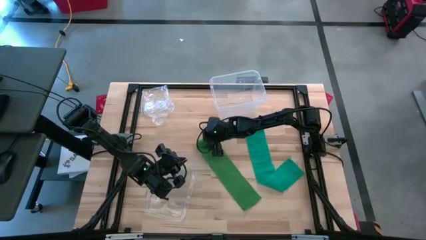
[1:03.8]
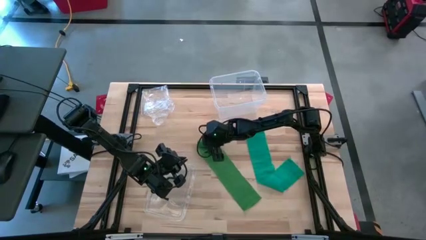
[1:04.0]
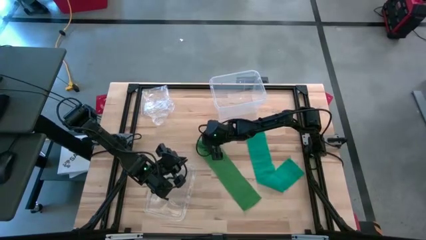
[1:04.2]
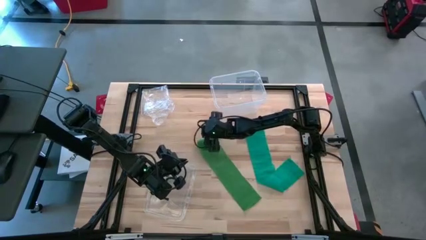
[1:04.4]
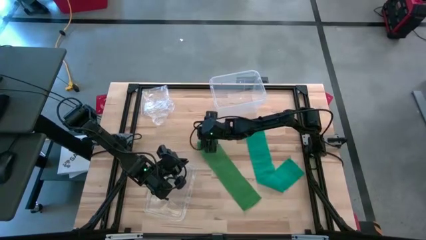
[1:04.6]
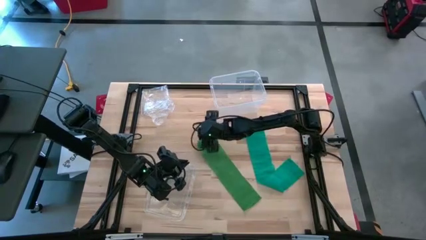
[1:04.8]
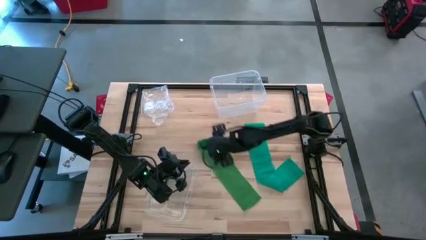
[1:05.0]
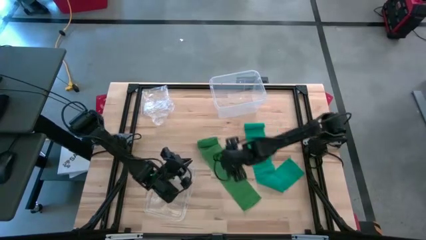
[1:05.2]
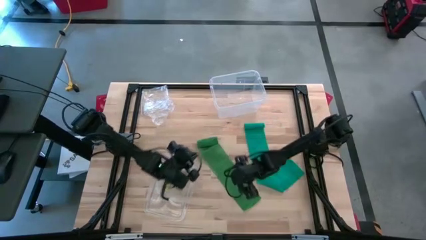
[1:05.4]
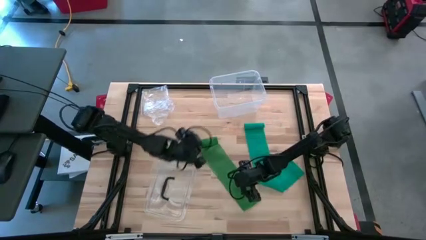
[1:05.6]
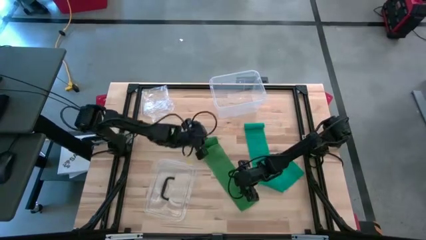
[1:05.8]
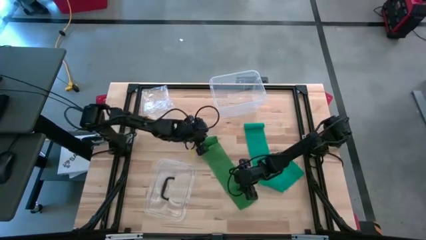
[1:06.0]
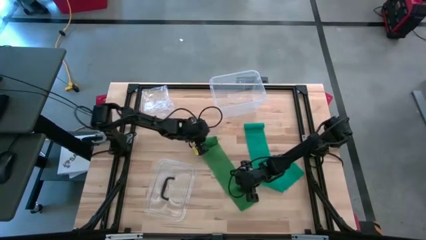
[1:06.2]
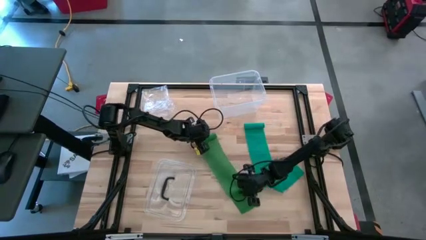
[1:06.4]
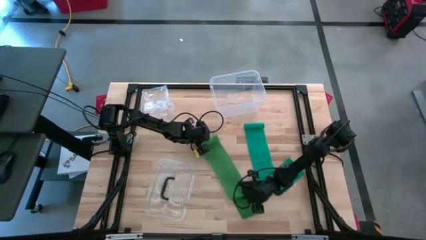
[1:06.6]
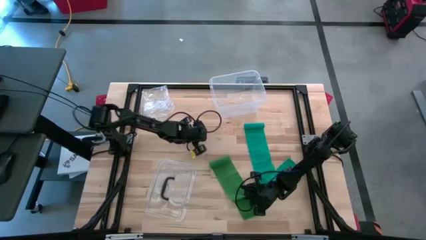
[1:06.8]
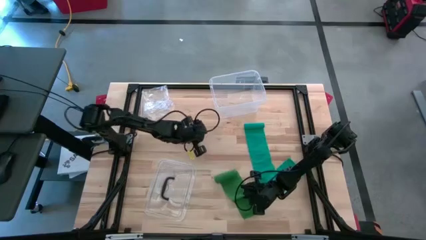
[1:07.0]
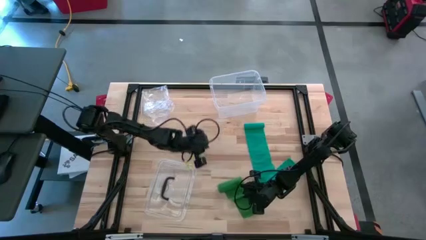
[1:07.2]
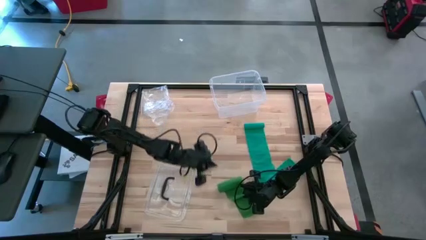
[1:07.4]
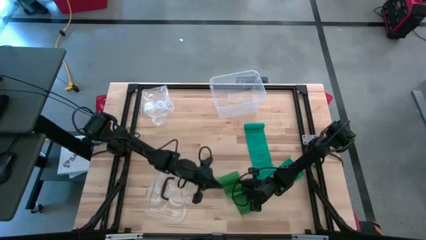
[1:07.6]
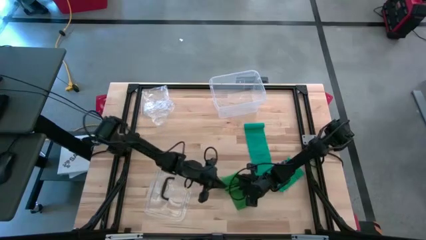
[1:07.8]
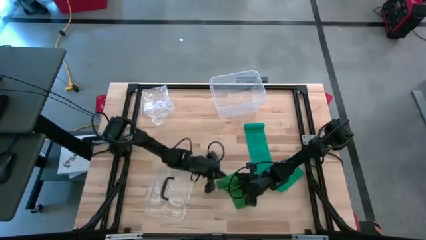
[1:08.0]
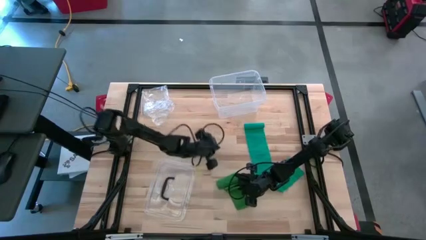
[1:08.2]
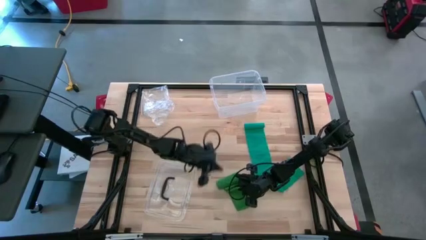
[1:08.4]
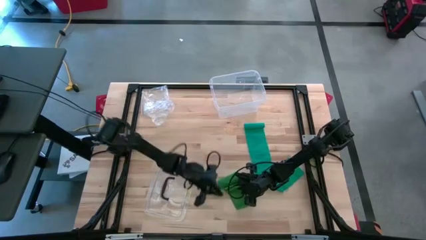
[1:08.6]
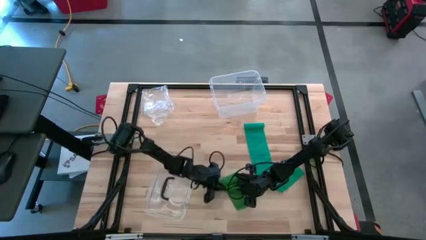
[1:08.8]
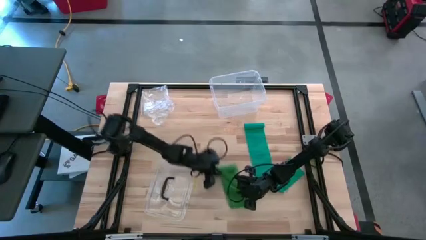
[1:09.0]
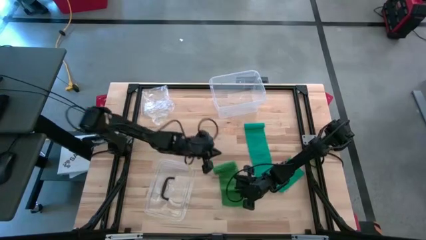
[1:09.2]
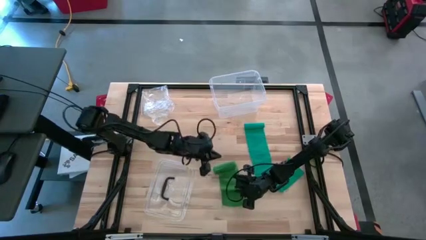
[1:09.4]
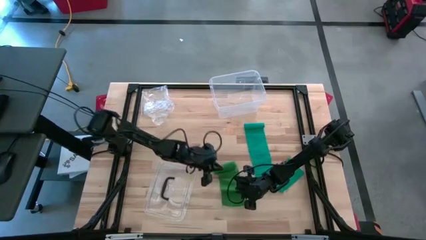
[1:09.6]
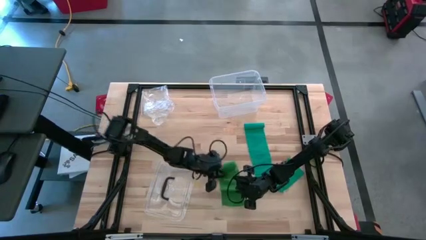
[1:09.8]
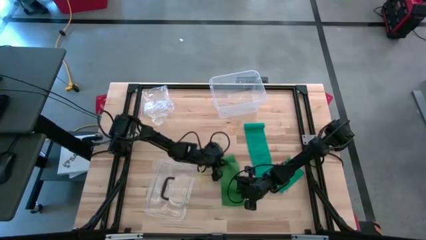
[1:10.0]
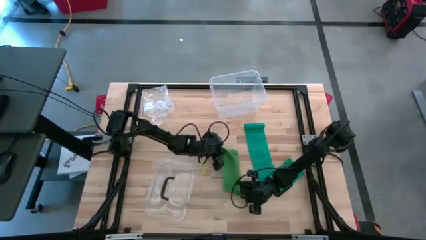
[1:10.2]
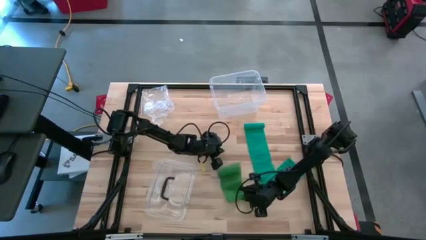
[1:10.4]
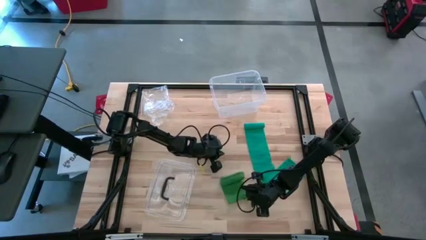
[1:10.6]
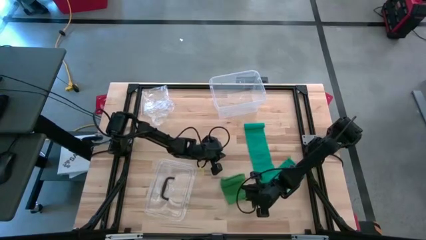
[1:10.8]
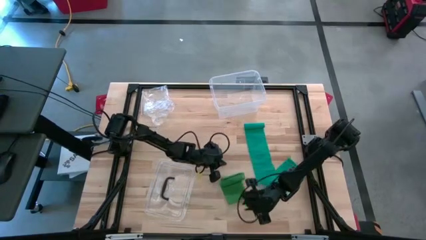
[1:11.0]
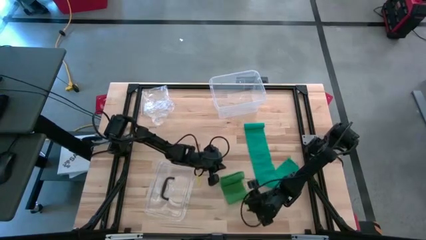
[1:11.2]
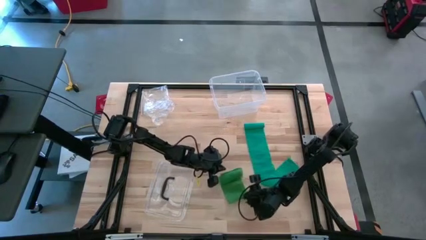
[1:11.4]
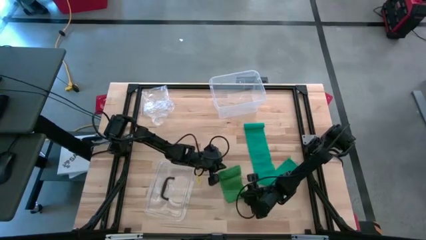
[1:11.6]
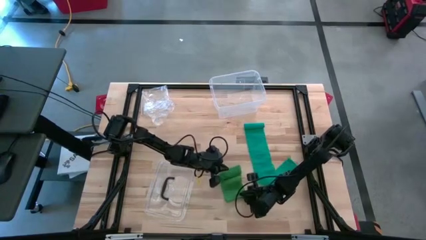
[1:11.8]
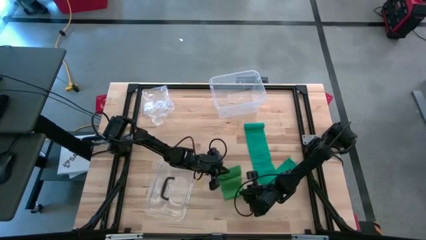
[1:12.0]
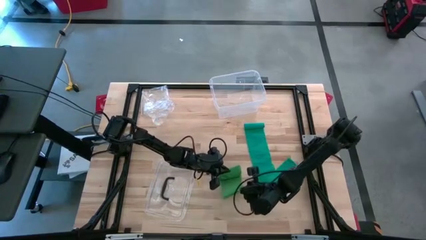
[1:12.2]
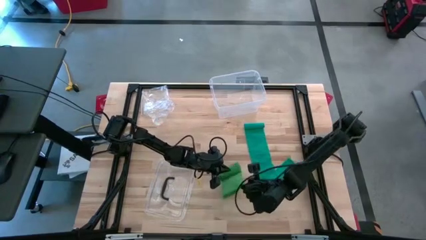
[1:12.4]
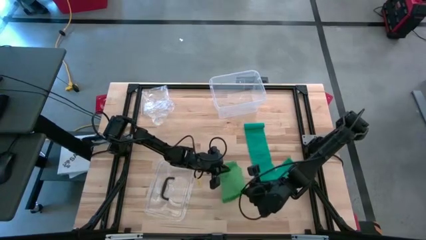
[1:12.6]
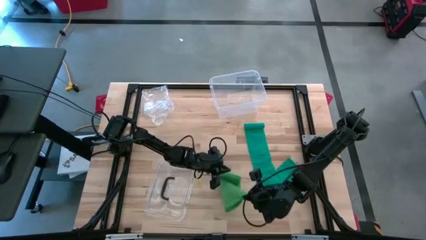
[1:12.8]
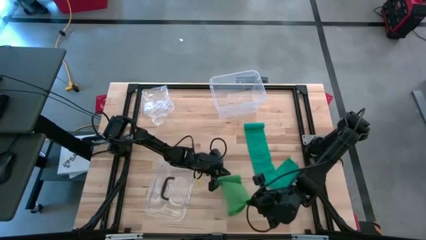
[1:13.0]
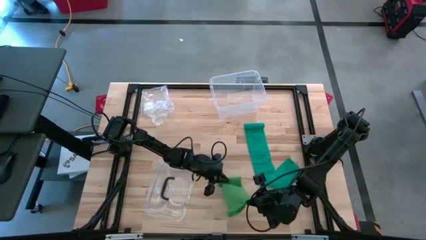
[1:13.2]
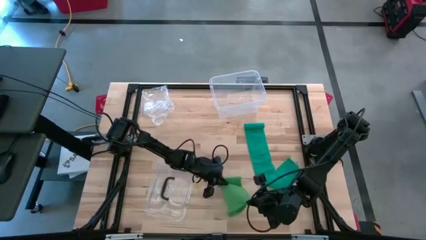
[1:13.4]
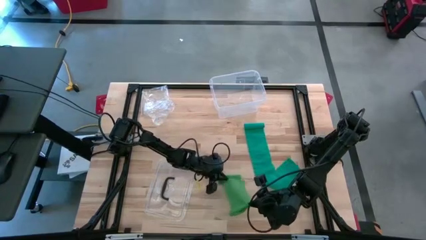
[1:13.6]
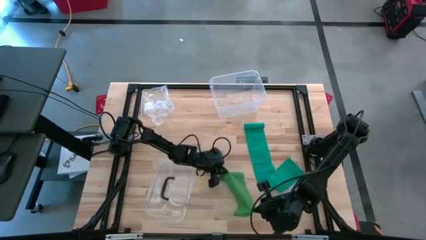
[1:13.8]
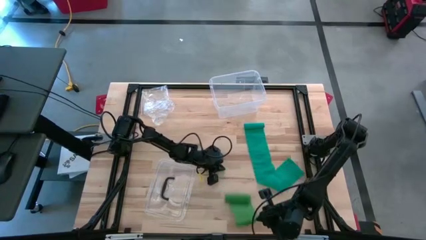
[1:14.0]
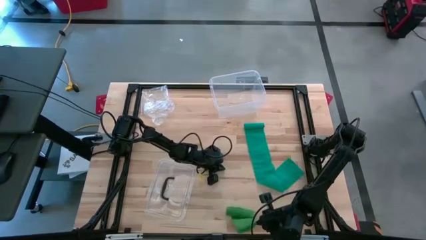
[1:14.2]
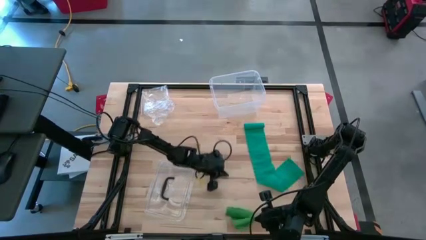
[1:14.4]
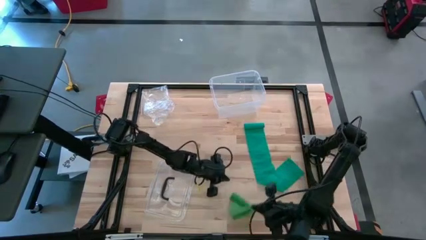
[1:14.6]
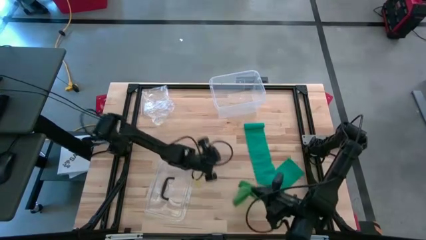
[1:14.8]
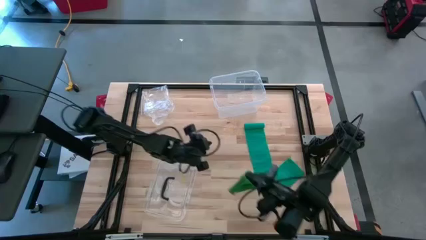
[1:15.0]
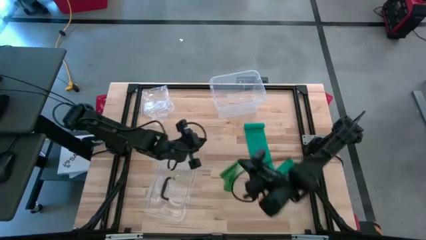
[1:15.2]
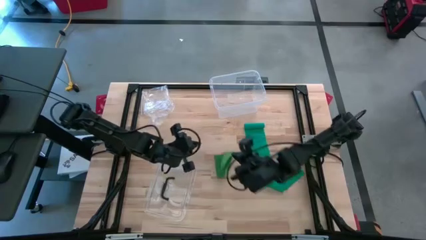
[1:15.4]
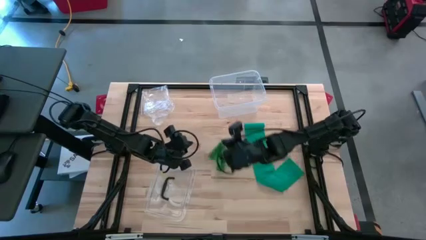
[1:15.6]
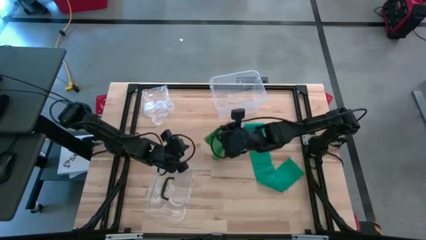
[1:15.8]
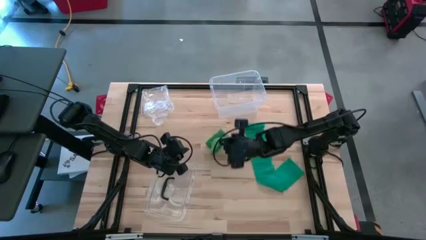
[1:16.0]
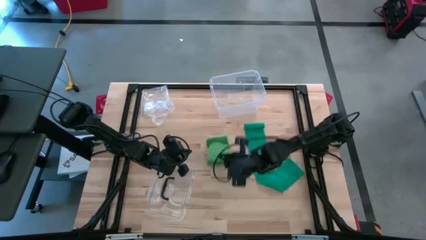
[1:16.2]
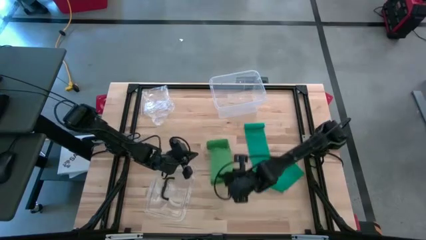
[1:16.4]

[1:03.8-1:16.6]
Task: Roll bandage
Roll the green bandage

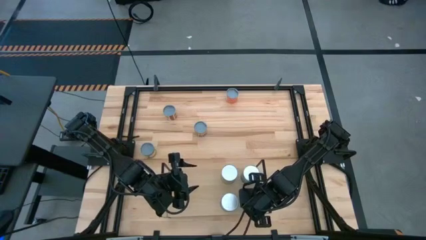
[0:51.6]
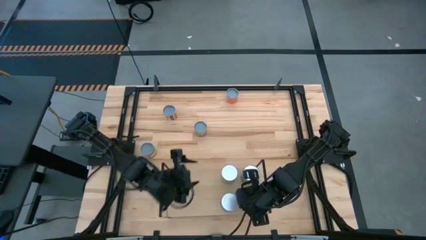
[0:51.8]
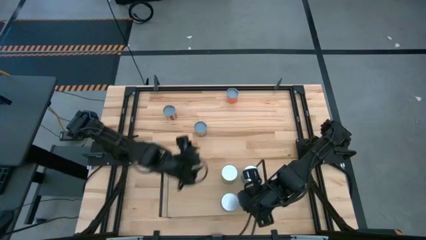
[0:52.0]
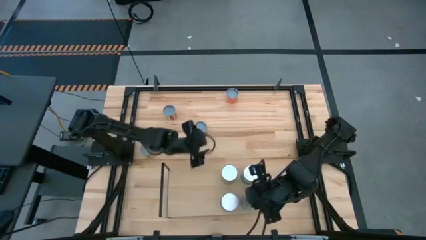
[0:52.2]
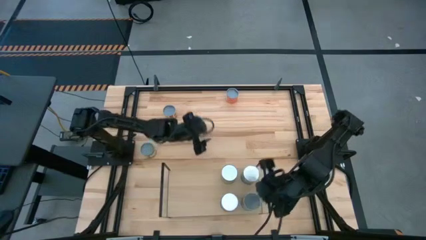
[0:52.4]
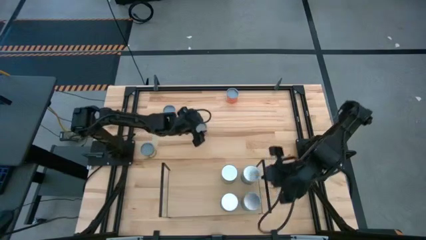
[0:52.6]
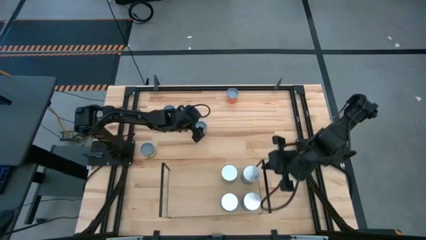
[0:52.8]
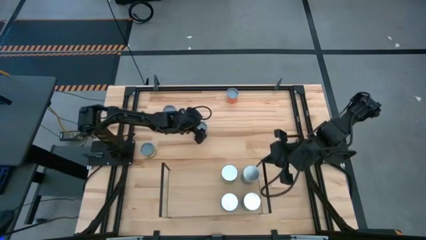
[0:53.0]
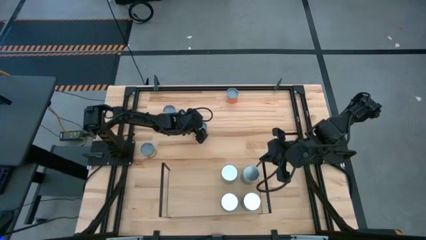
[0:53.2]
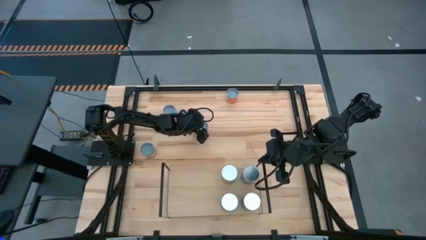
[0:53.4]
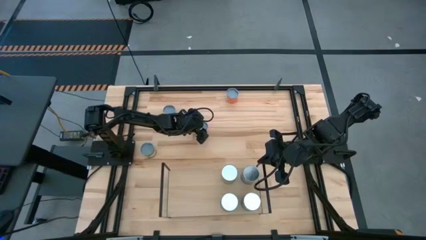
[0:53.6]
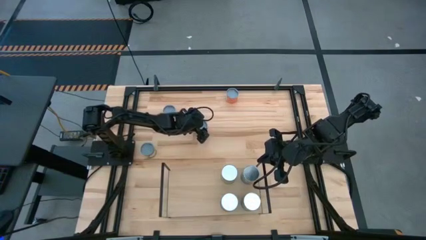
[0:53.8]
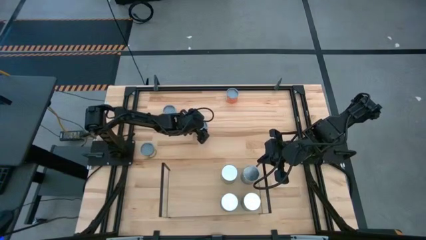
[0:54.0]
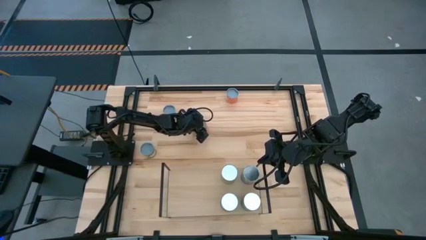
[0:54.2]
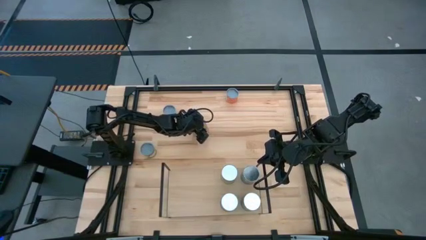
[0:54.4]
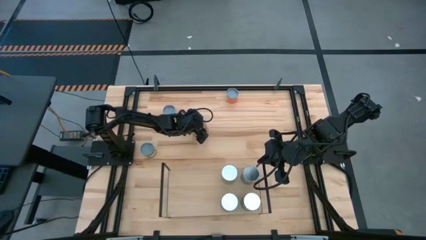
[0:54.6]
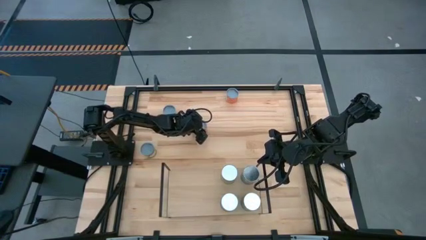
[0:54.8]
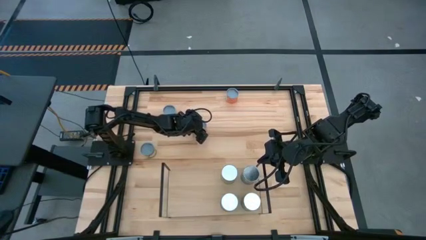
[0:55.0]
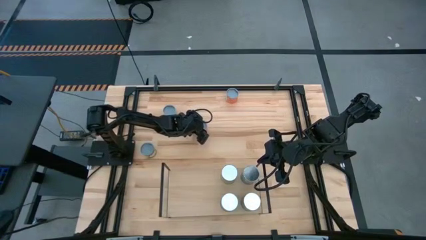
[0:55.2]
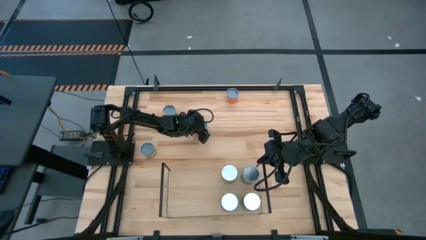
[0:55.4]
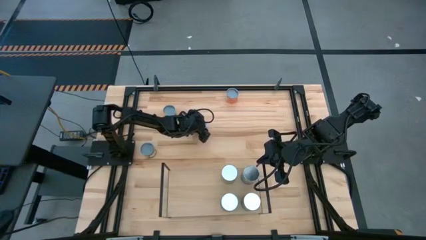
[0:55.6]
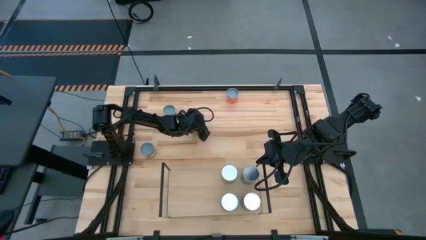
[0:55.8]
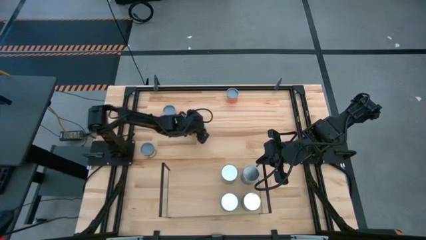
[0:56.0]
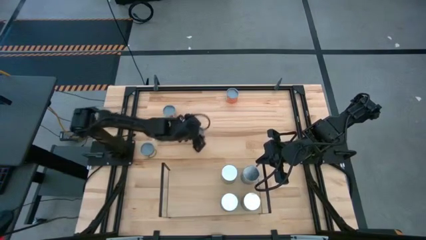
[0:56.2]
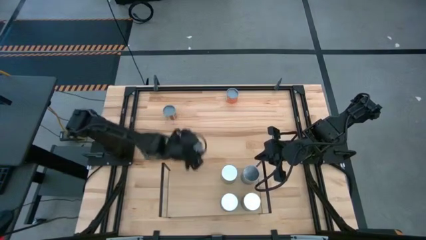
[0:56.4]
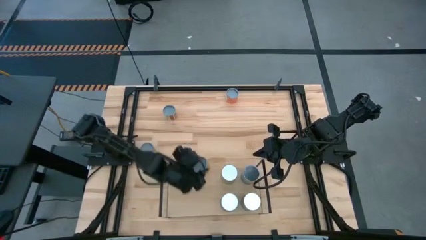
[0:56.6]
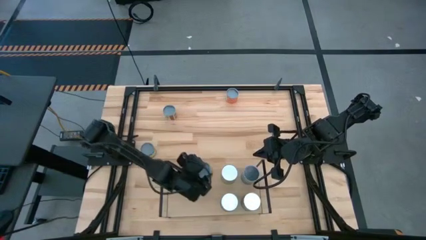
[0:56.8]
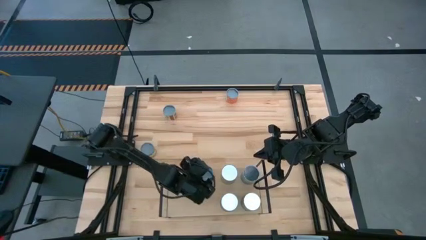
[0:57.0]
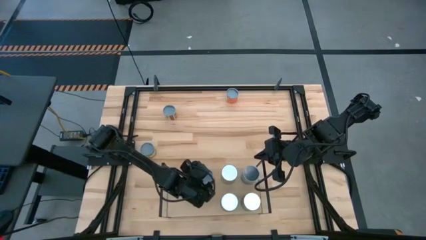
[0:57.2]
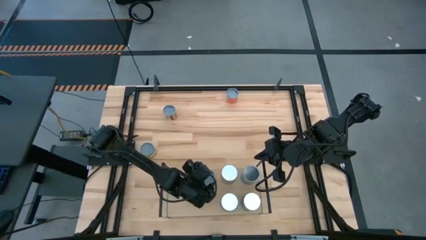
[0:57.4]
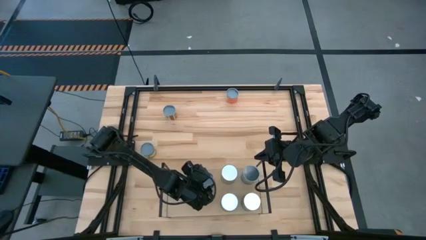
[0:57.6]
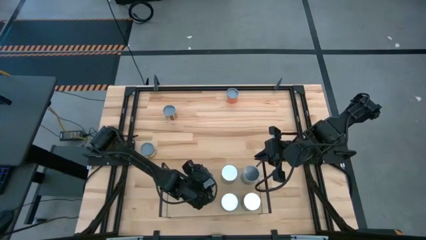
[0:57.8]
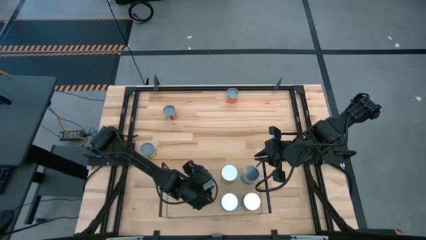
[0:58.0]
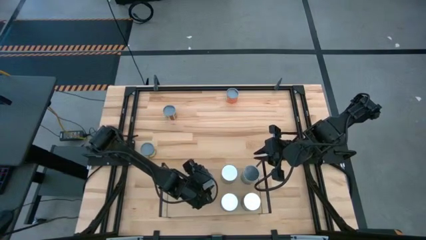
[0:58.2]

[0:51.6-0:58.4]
Task: Pick and place cans onto a shelf
Put the canned spicy black beans on the shelf
